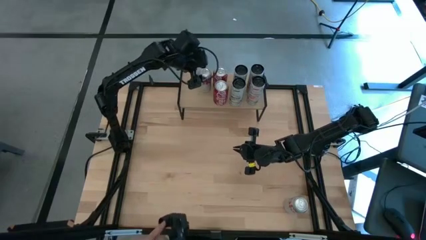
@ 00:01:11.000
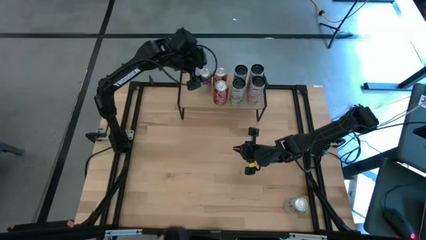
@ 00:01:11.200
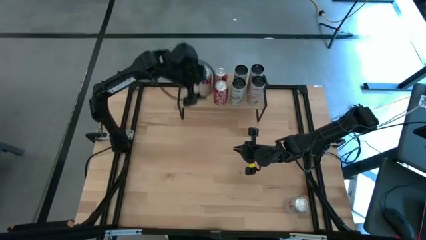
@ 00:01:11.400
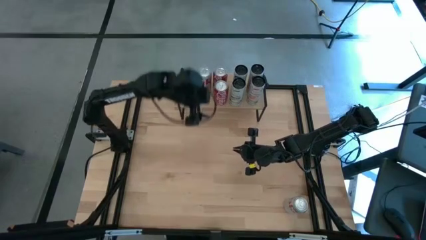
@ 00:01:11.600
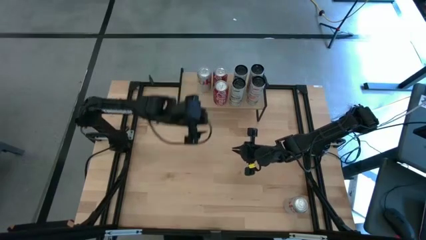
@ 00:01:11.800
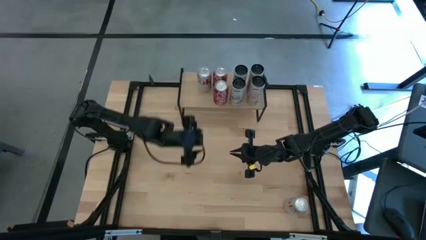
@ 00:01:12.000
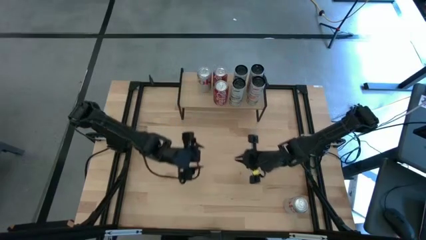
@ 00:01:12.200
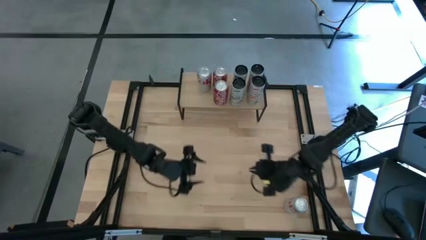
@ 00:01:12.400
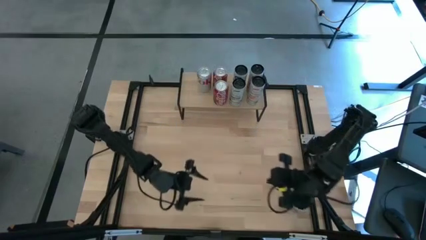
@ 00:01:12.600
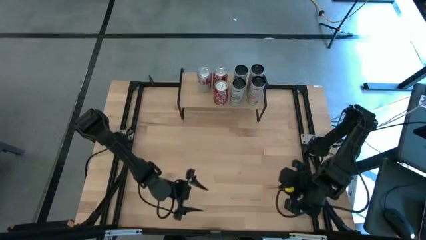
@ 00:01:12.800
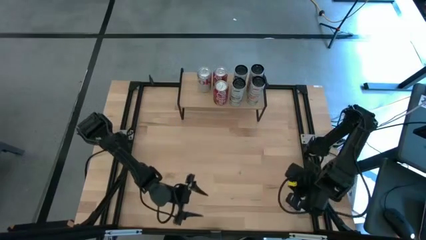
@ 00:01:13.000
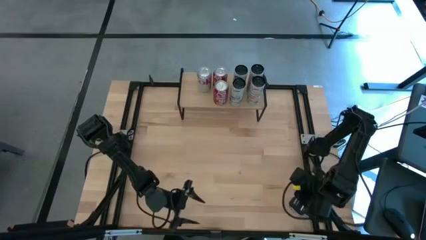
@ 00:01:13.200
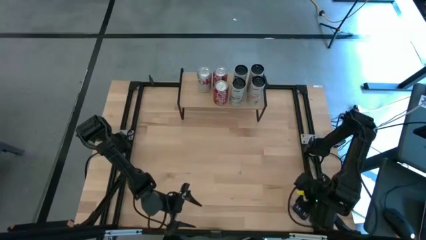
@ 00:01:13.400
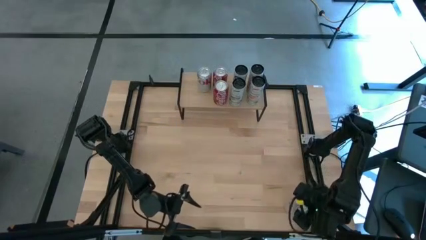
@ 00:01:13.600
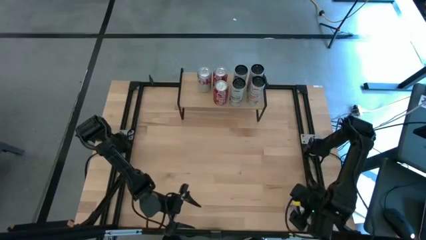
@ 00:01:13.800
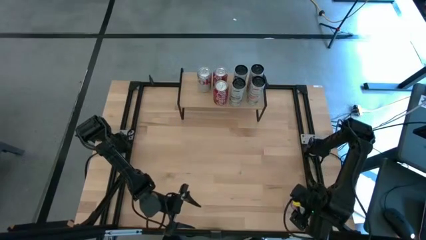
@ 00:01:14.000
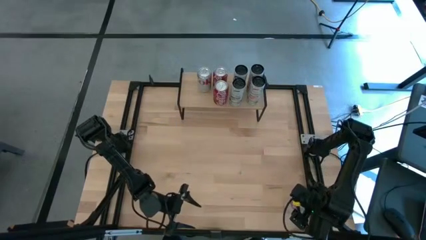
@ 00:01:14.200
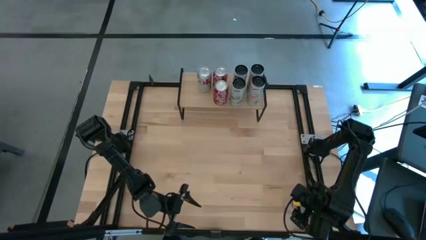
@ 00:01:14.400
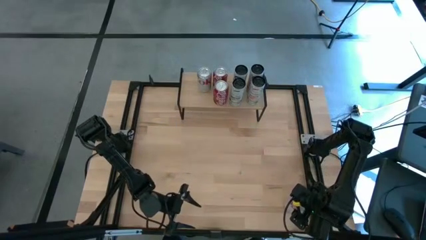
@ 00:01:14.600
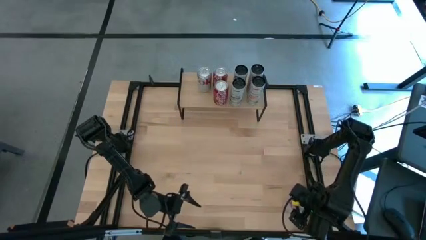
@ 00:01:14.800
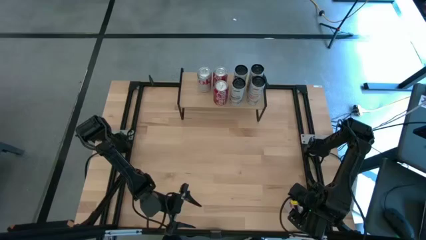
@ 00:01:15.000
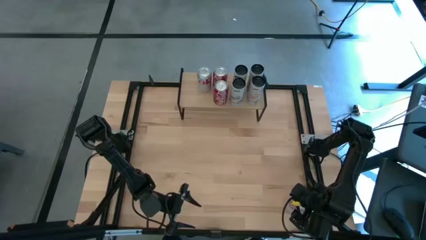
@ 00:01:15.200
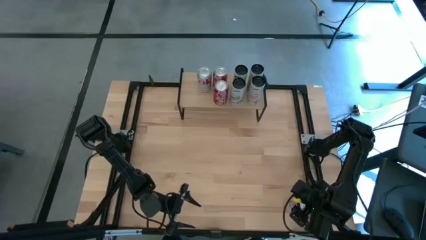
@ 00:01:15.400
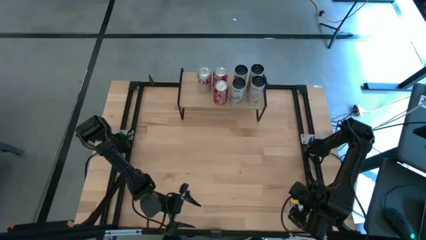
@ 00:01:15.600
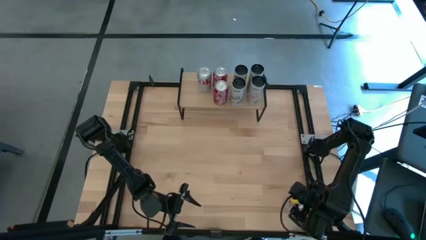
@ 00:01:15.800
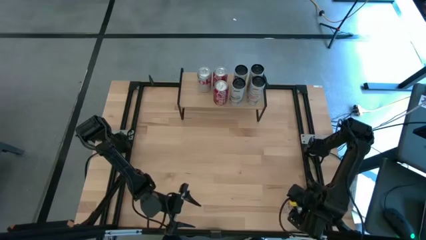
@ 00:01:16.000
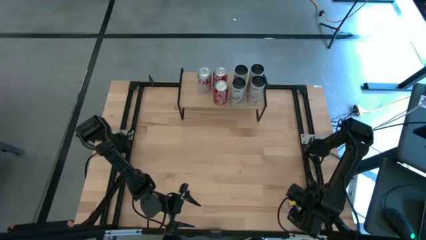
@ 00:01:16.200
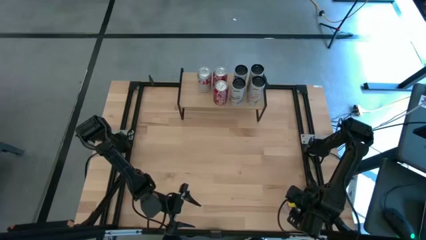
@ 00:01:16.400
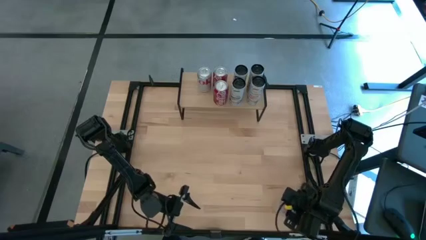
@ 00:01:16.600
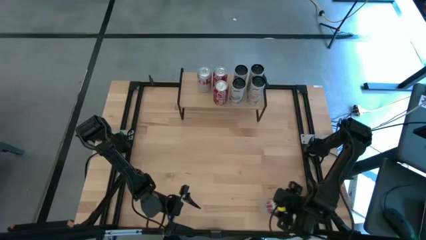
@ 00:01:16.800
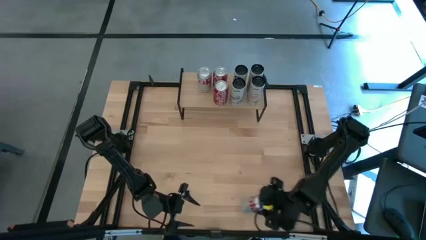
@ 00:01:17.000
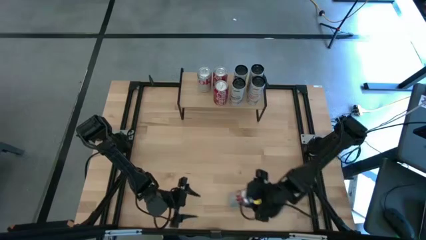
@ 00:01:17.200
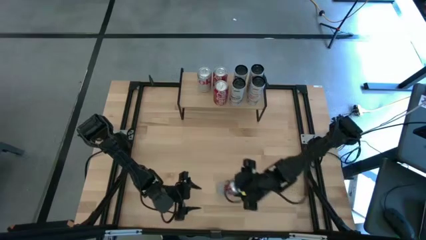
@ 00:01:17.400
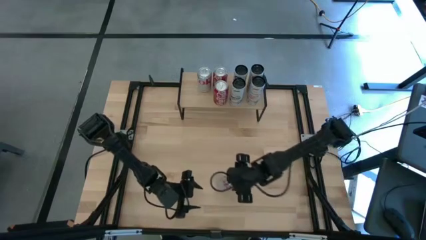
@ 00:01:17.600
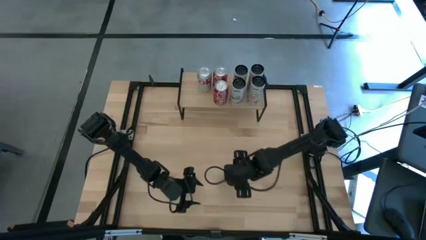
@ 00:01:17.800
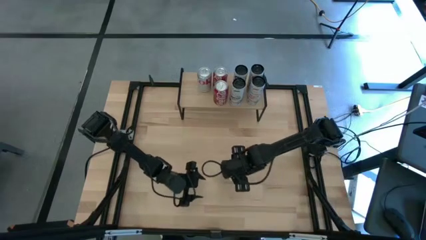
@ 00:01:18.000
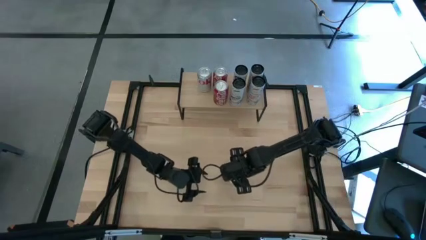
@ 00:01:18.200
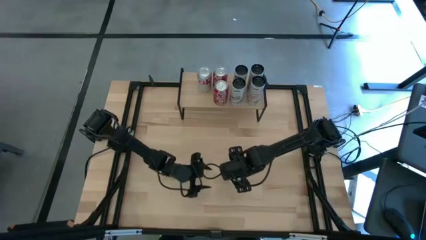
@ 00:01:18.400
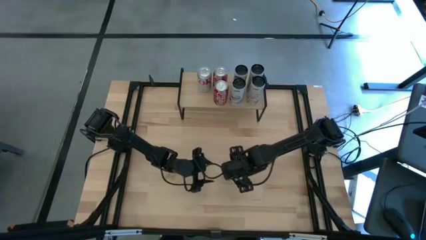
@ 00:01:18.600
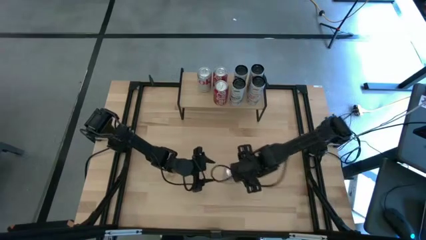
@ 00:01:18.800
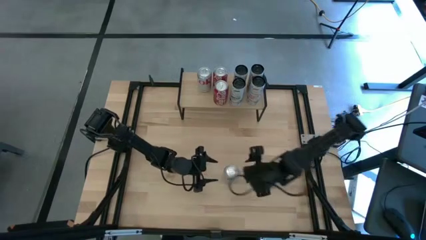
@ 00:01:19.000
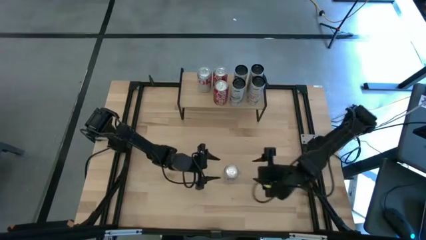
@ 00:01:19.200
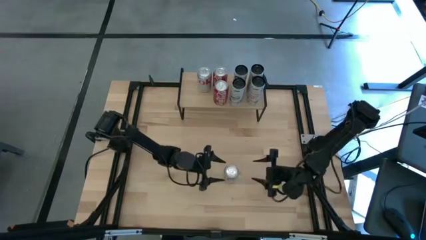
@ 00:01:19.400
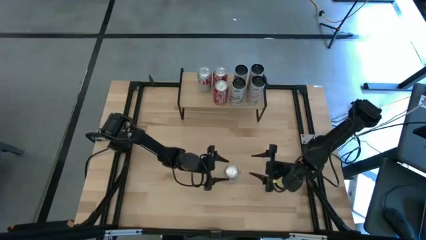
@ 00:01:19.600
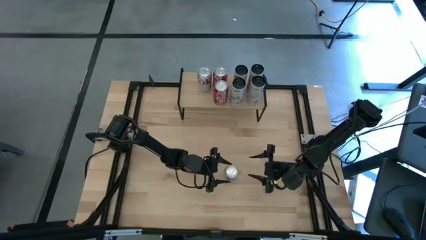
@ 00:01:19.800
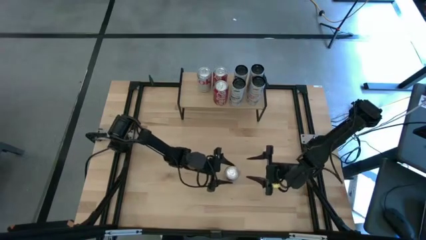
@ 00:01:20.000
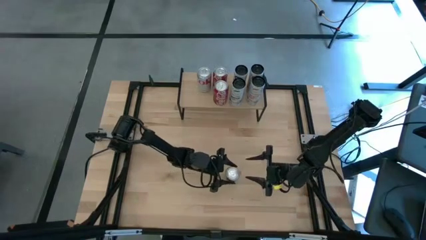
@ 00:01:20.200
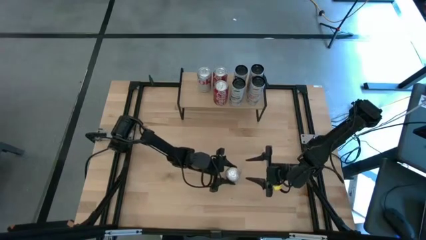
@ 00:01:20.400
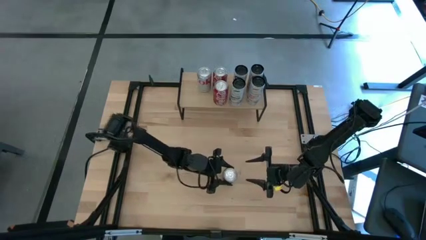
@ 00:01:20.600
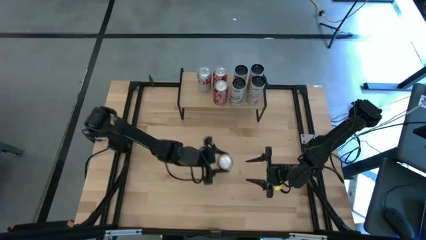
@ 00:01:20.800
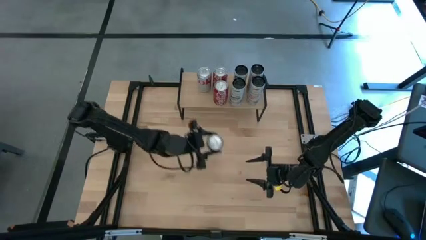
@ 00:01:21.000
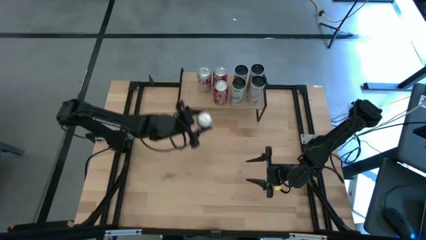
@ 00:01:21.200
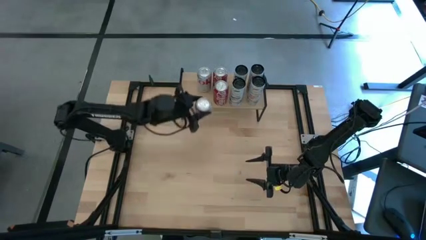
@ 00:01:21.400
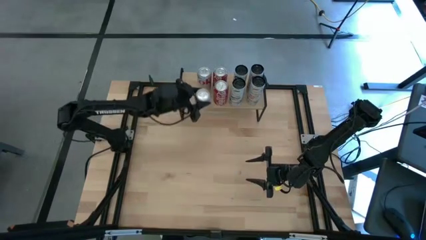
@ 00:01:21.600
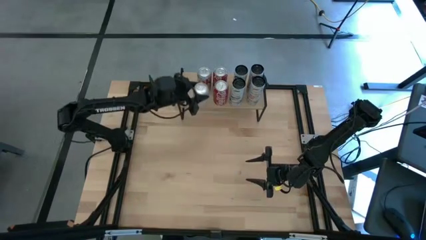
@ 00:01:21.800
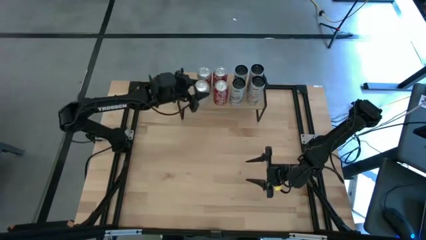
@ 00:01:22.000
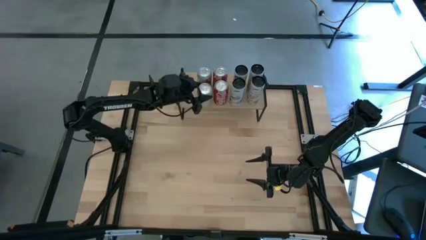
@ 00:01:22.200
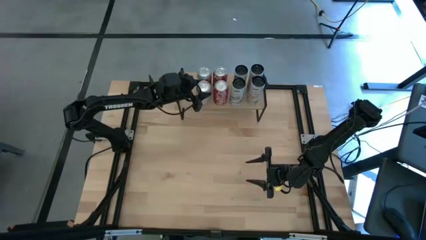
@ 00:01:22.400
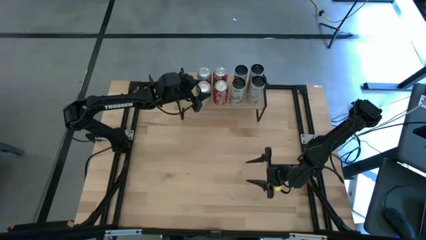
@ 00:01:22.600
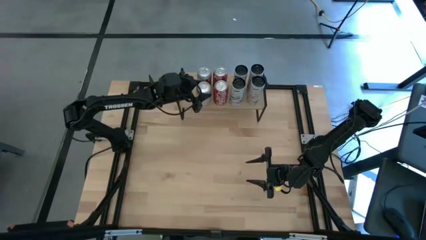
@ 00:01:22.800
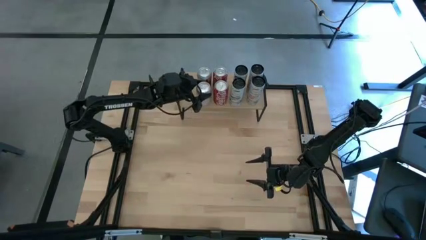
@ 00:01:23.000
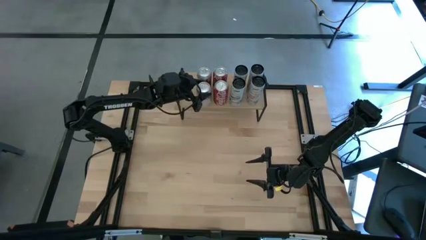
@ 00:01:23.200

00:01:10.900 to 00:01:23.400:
Task: Place canned beverage on shelf
Put the silver soda can on the shelf aligned with the other silver soda can

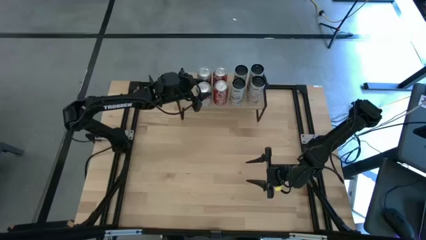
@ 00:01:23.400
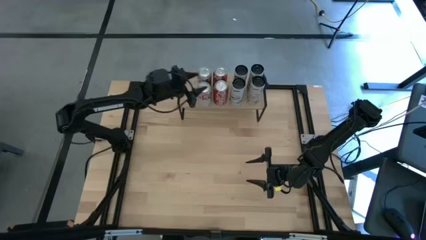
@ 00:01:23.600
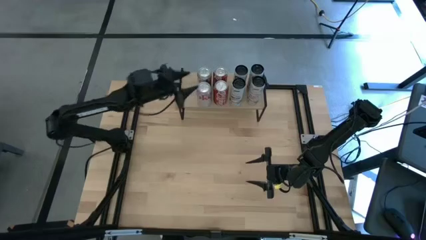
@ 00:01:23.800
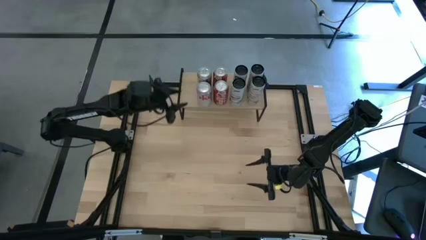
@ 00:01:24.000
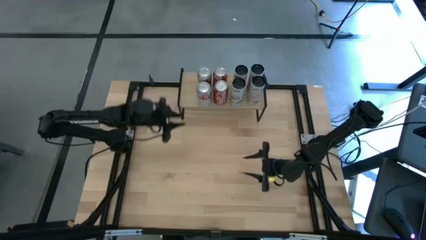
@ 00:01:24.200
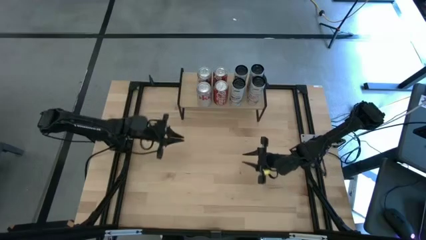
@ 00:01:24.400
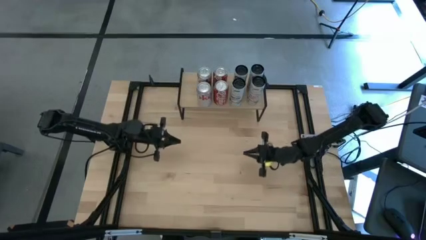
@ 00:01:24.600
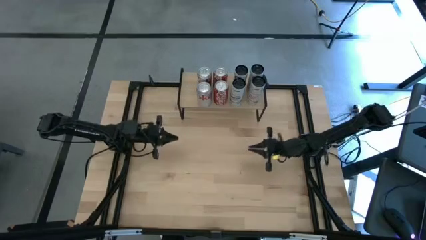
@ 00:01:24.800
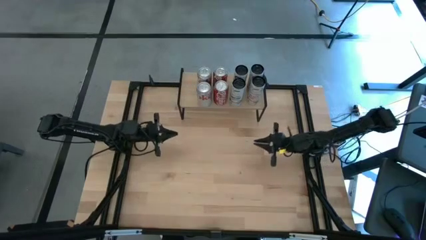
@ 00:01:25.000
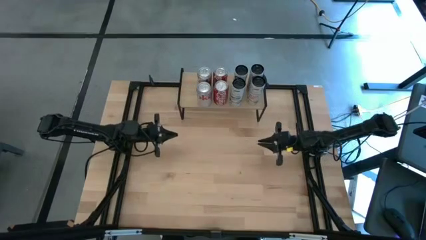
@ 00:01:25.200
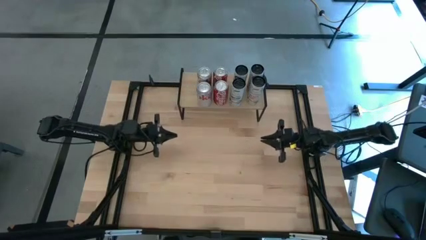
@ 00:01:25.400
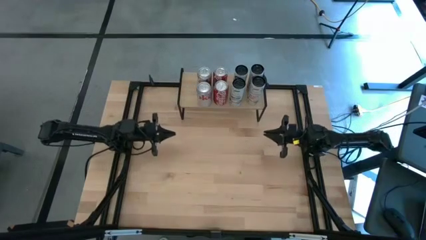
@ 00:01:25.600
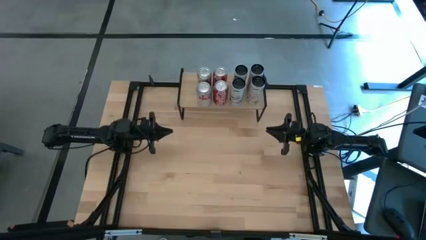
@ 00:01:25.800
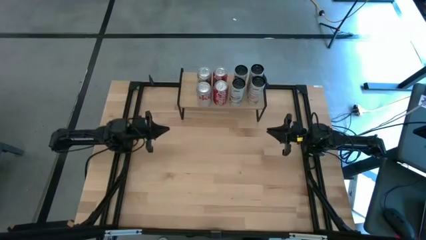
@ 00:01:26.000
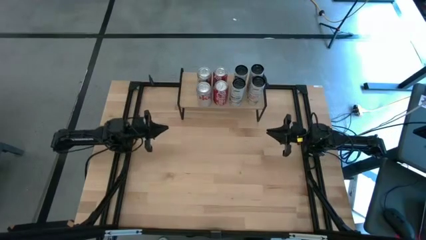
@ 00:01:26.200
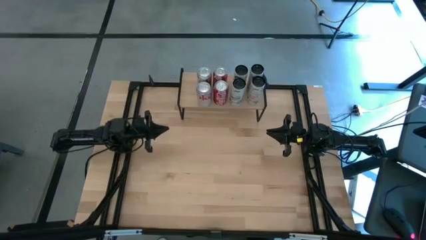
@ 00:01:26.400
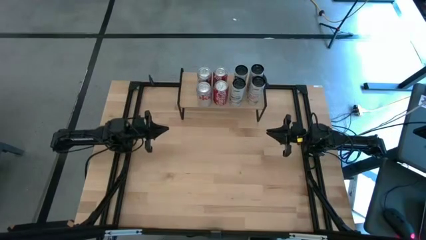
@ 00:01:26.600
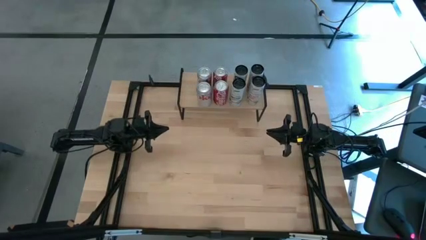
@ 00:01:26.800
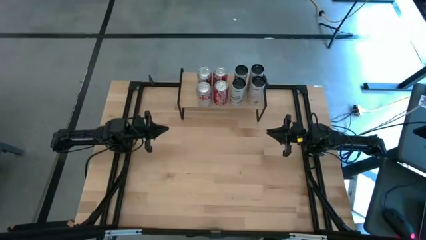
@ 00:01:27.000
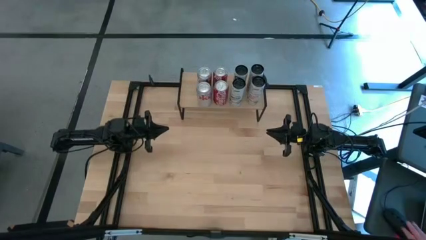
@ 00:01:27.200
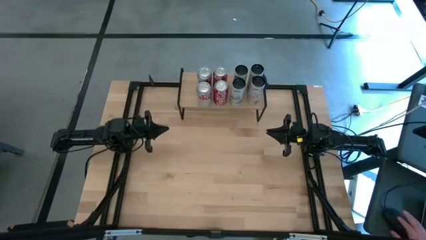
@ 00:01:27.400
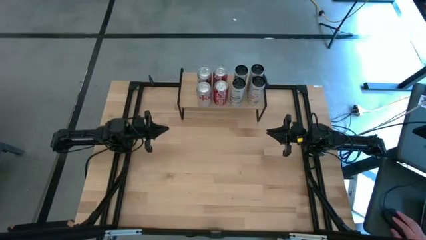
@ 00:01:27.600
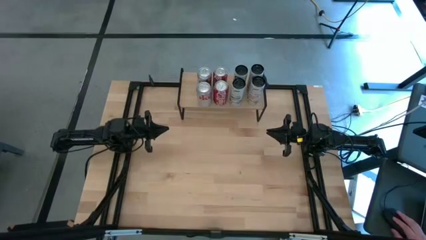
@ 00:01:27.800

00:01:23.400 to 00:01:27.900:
Return to Home Position

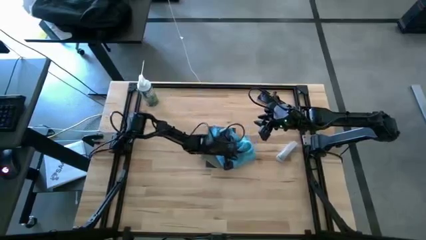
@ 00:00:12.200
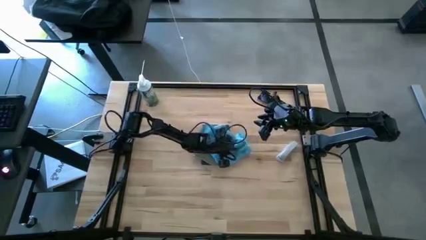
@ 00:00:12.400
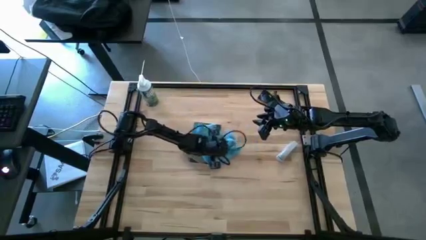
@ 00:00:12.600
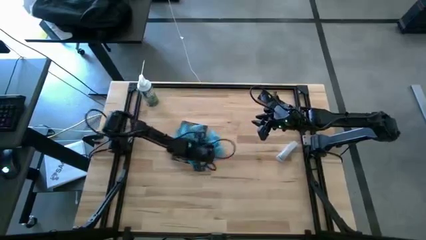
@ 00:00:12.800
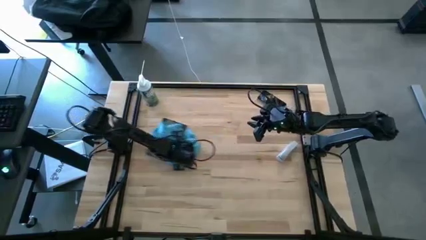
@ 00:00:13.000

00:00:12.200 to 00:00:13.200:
Task: Apply microfiber cloth
Move the books from the center to the left of the table
